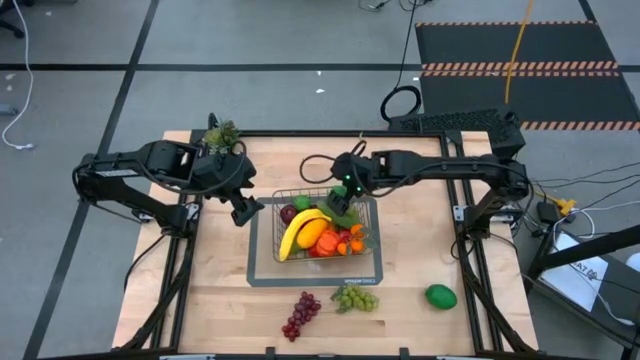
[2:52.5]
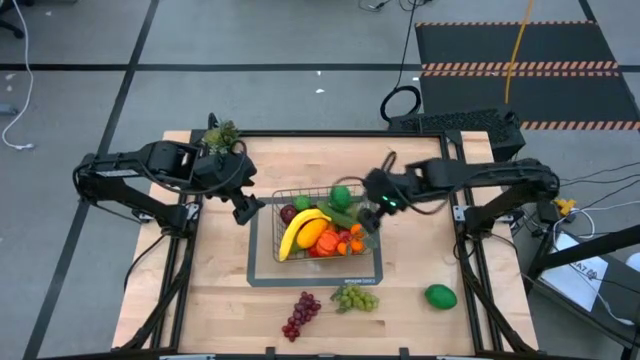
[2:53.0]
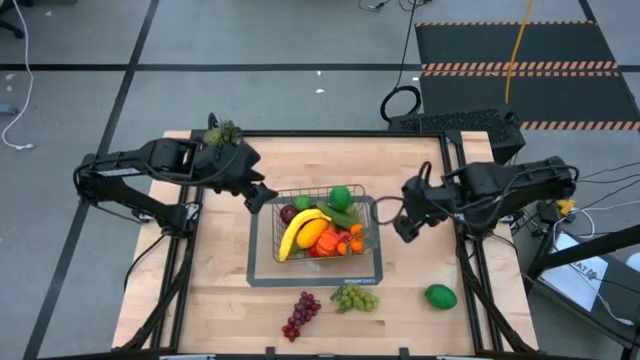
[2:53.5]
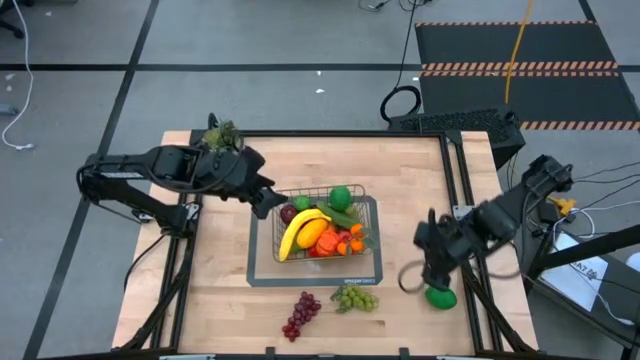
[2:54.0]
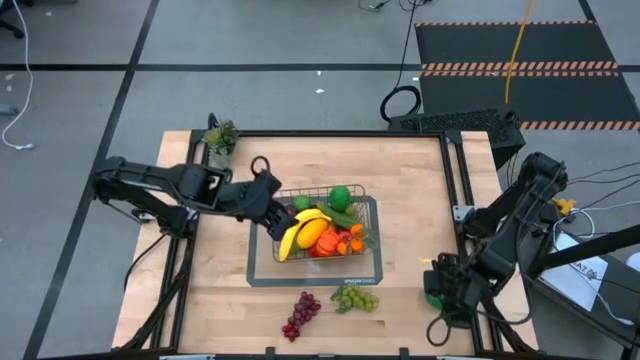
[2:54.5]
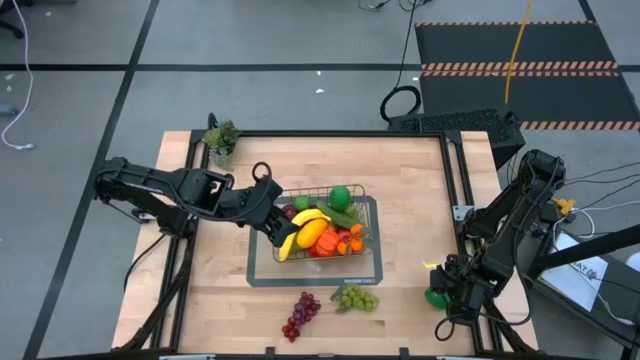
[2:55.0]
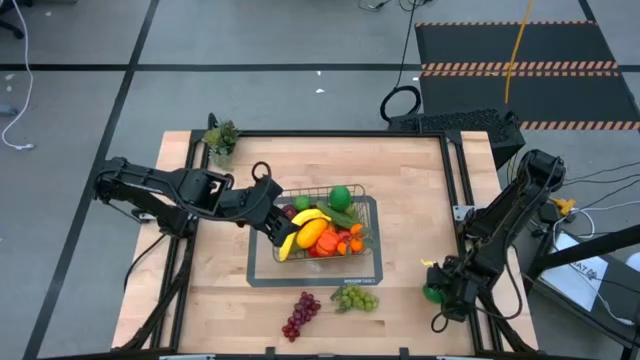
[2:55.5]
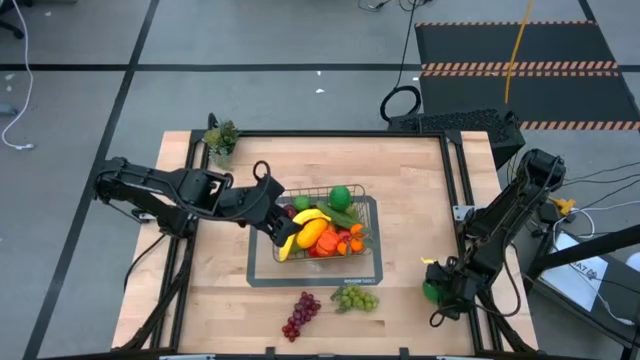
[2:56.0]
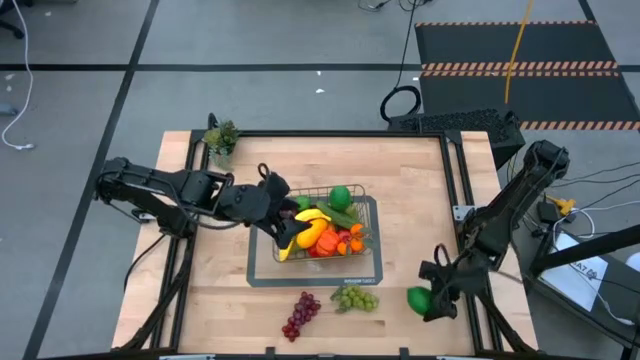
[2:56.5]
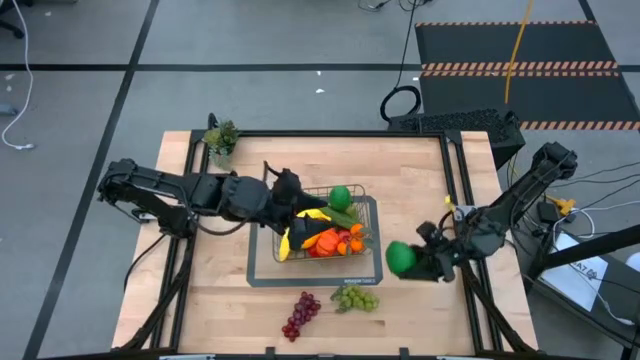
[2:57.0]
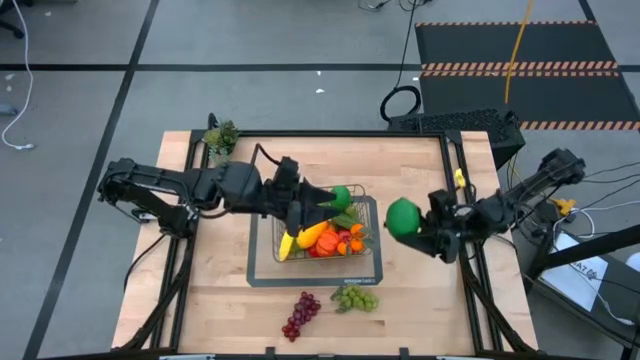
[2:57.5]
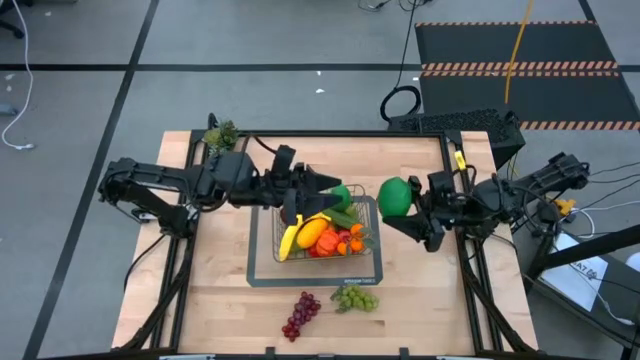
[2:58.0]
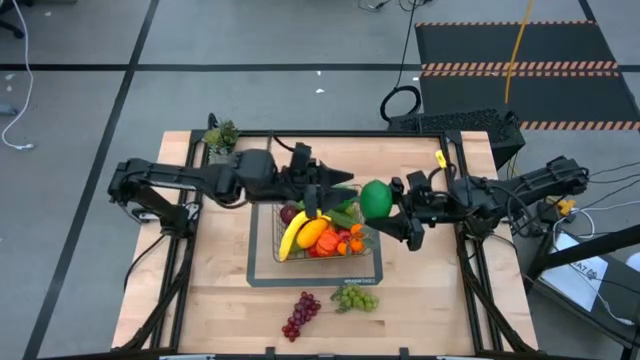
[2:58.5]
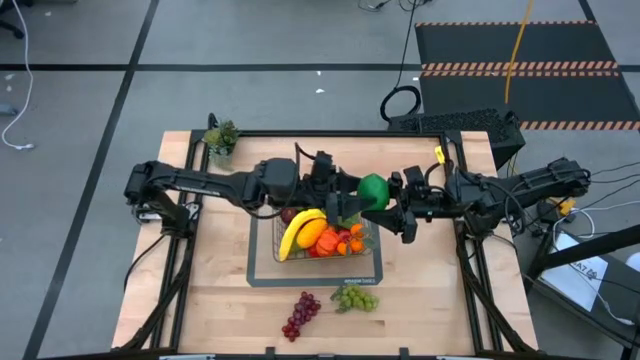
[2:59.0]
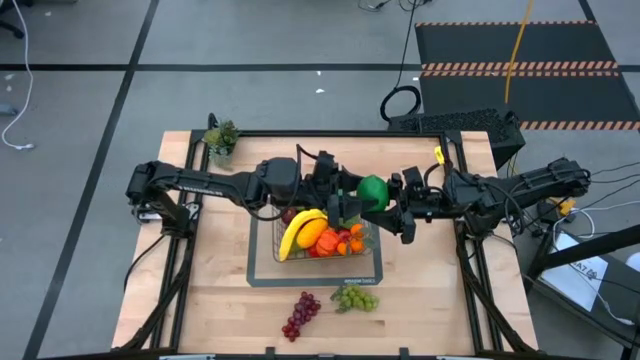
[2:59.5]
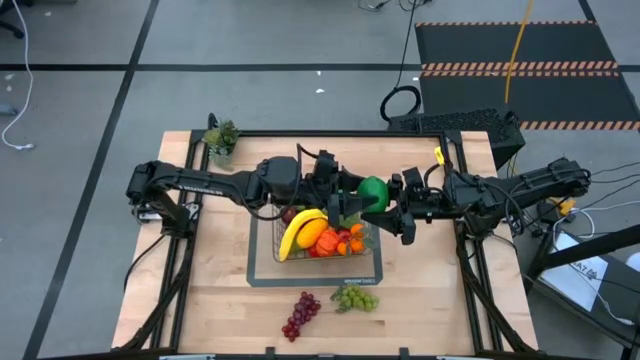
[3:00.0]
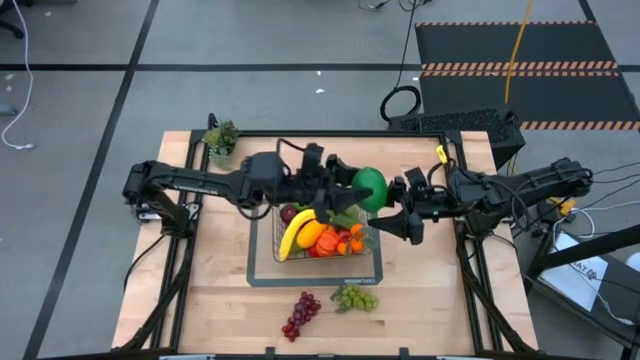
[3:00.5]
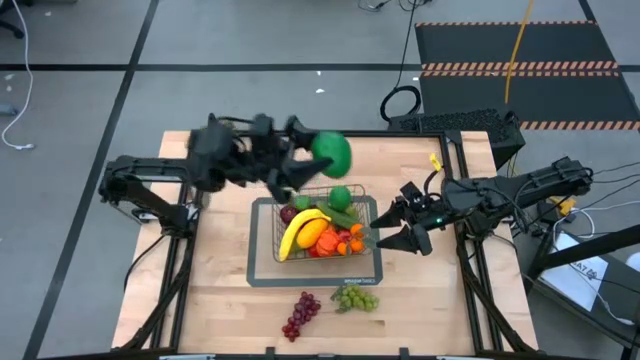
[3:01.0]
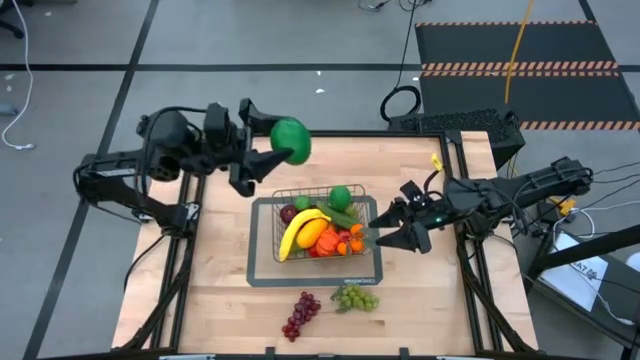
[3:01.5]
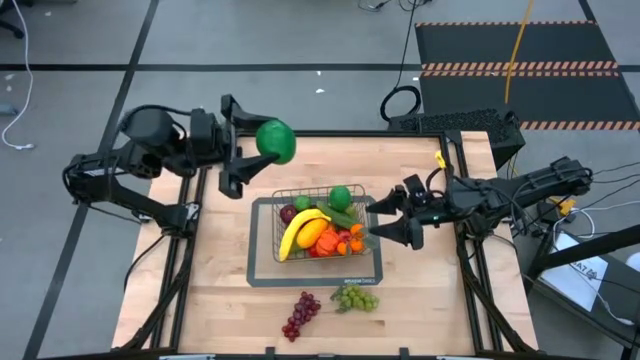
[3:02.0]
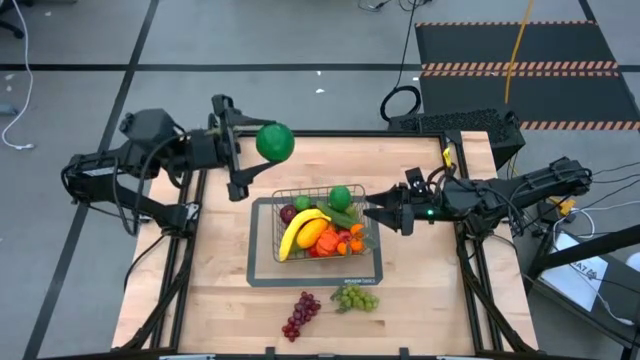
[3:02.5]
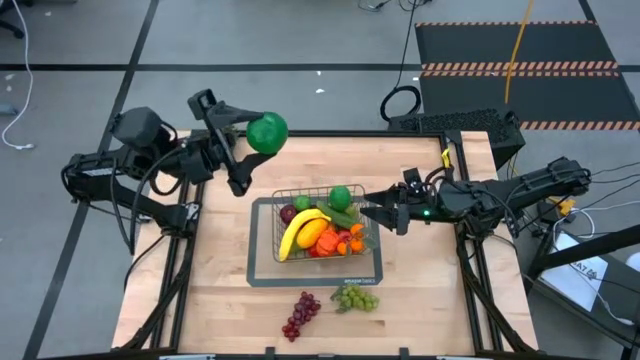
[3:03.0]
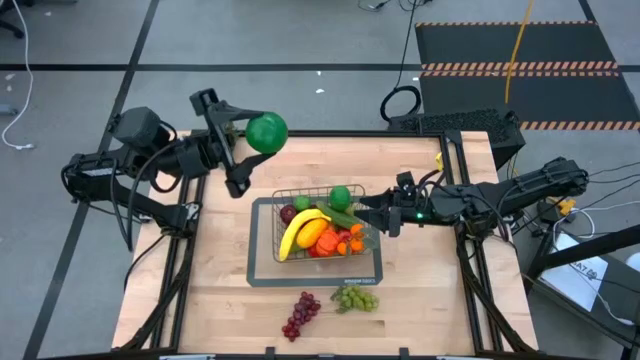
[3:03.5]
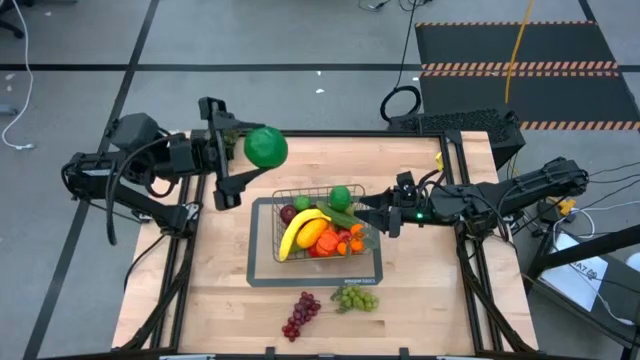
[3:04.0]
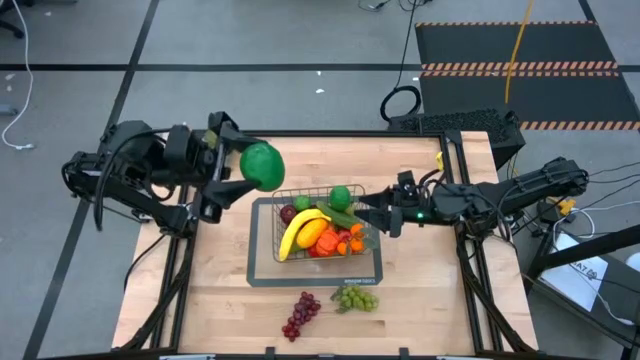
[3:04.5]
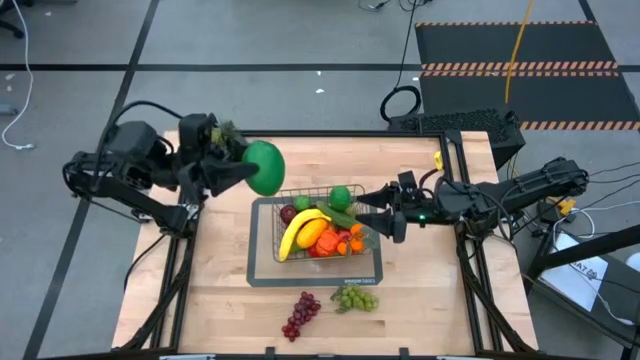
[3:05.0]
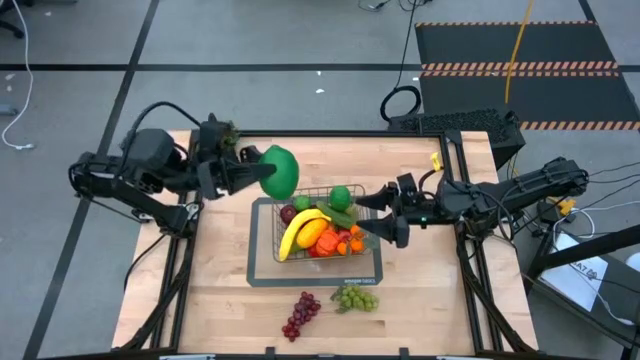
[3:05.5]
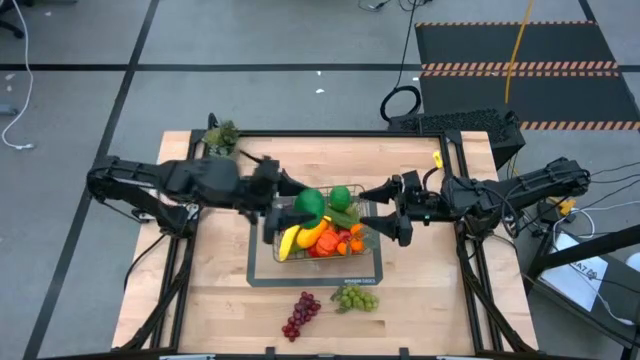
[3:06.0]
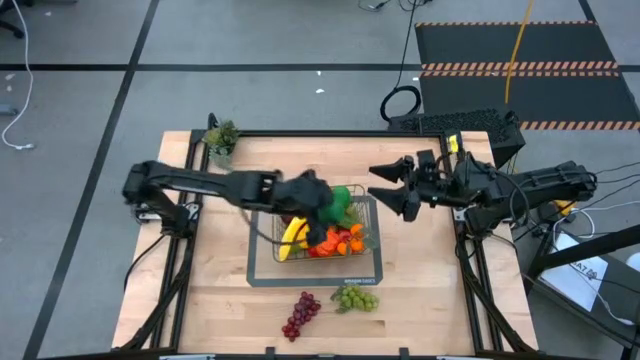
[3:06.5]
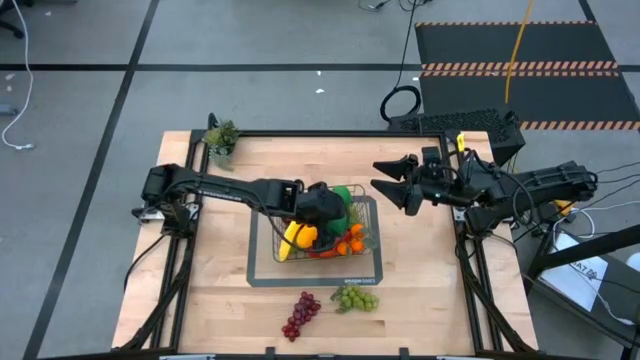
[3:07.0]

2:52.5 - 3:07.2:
Task: Build produce basket
Put the lime into the gold wire basket

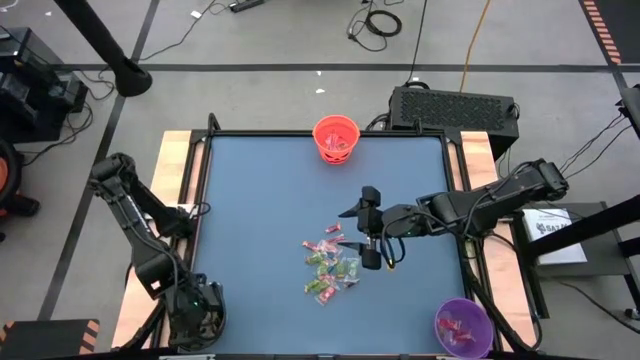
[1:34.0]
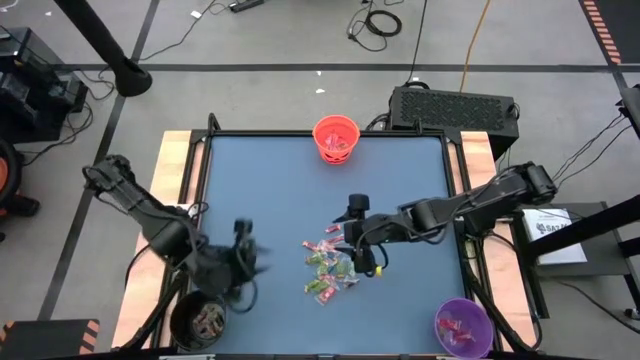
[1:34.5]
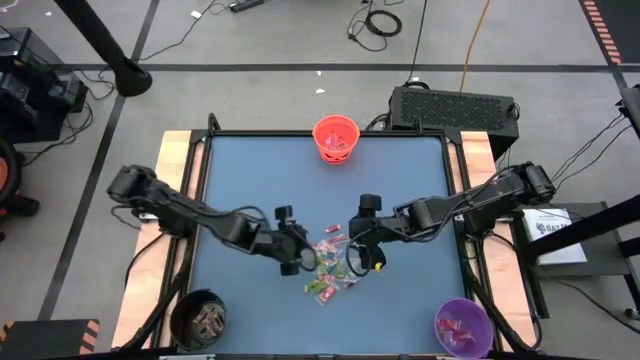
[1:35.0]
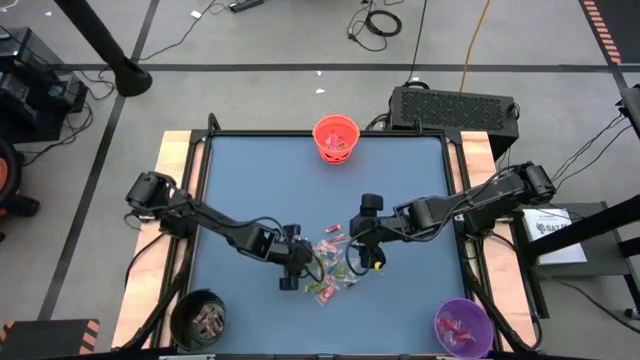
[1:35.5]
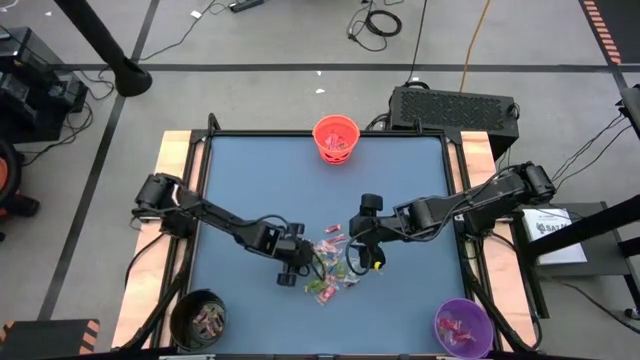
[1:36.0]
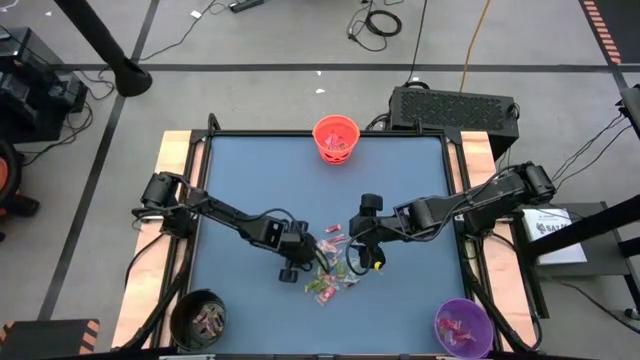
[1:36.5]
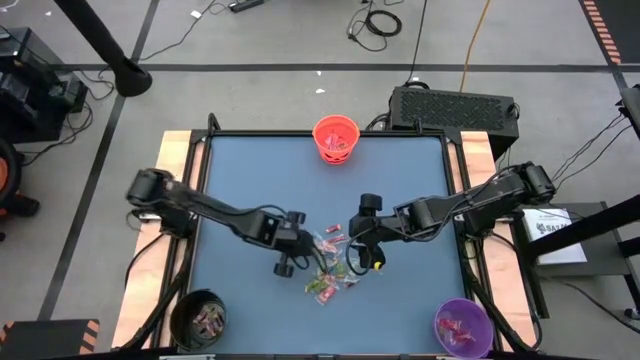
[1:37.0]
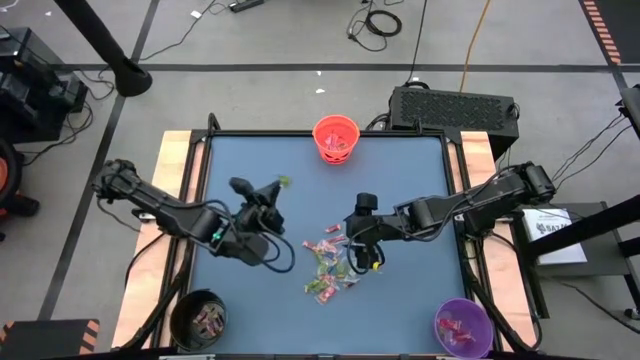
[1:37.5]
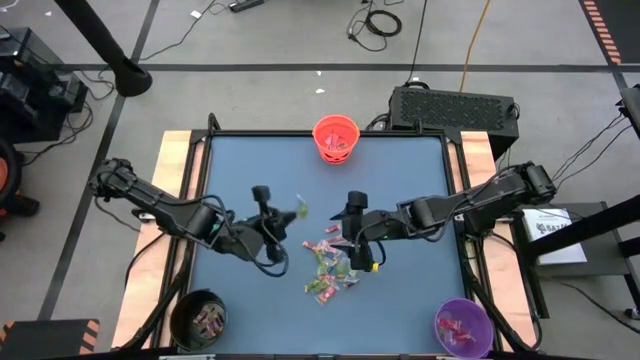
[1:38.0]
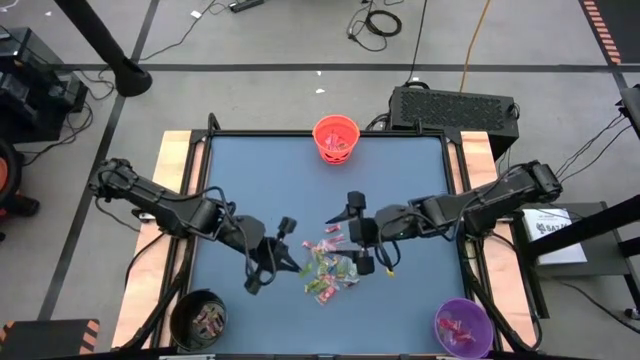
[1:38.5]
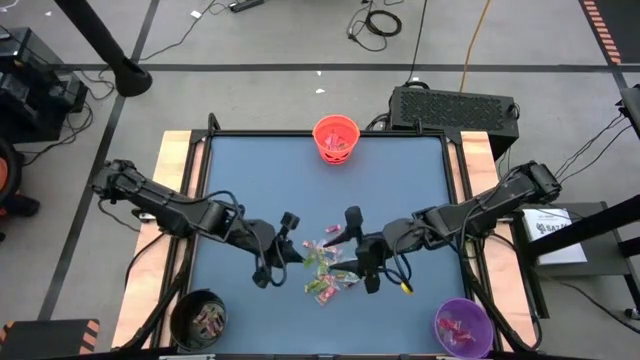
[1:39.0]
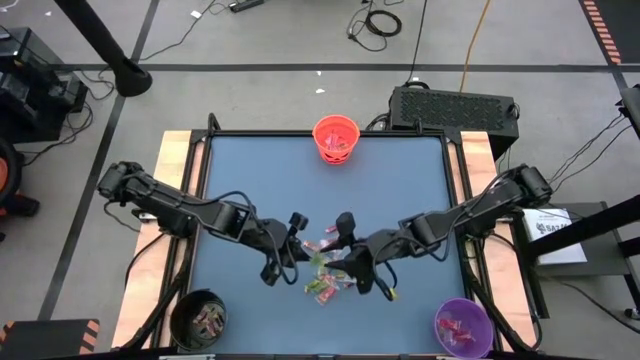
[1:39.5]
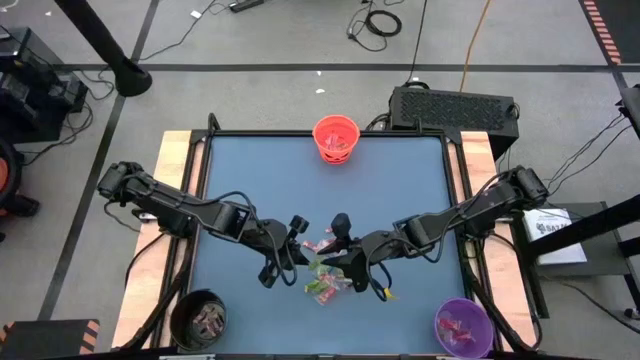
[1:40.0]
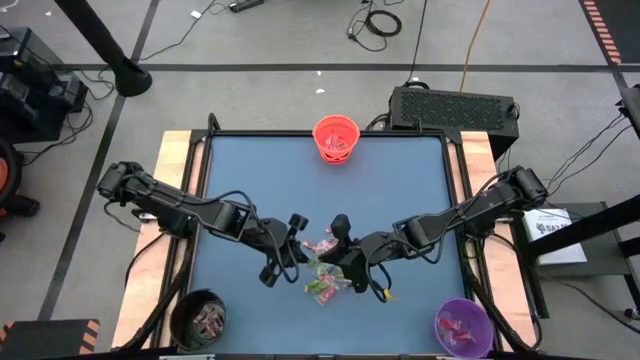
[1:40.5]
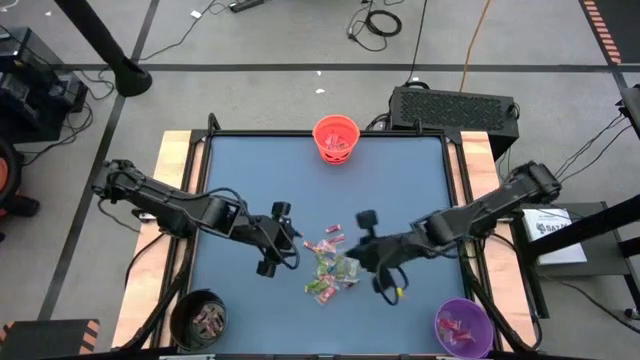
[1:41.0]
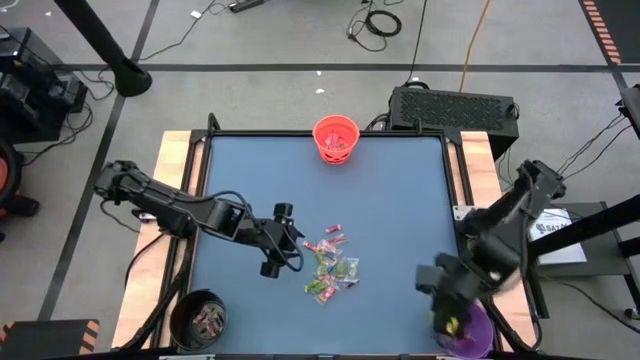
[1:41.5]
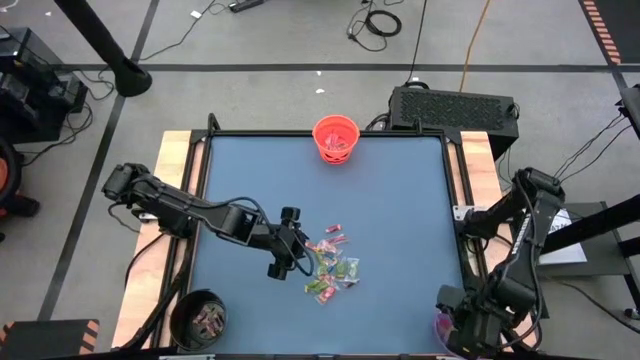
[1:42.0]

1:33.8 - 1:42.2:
Task: Sort candy by brand, put in halloween buckets
Put the small green gummy into the purple bucket
